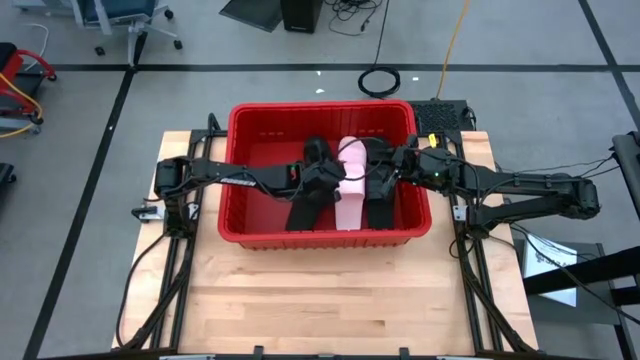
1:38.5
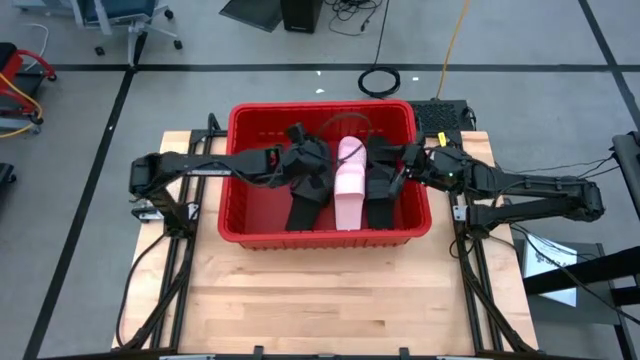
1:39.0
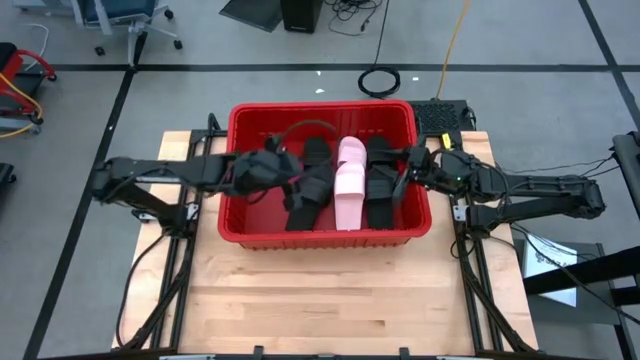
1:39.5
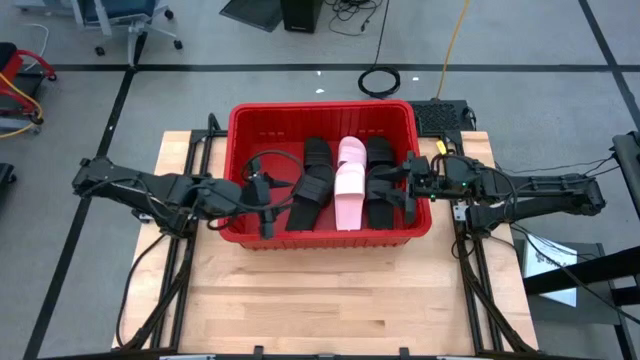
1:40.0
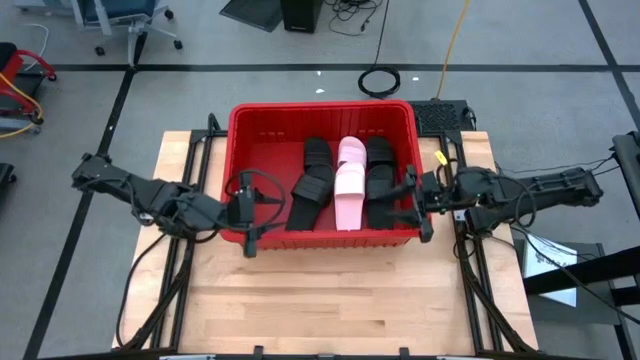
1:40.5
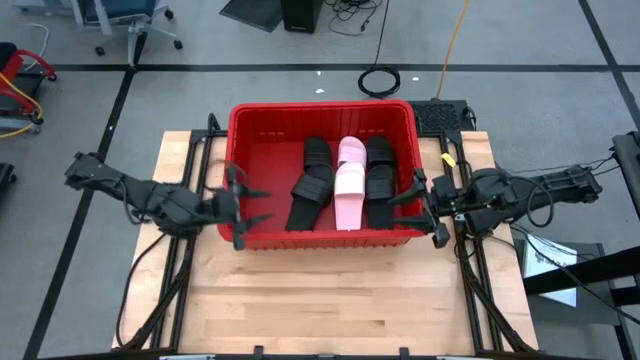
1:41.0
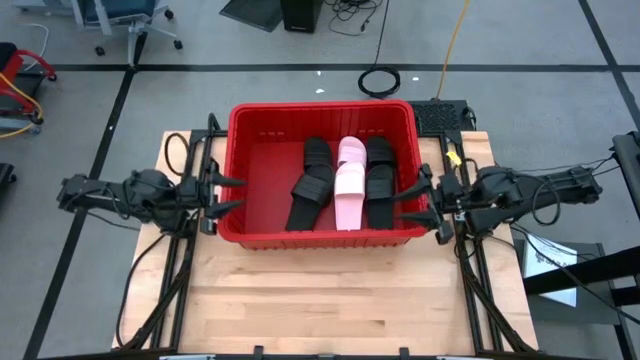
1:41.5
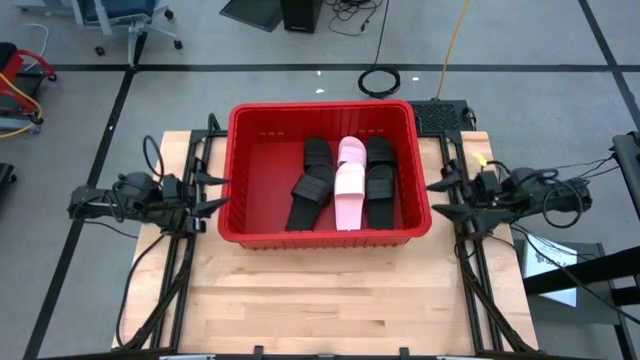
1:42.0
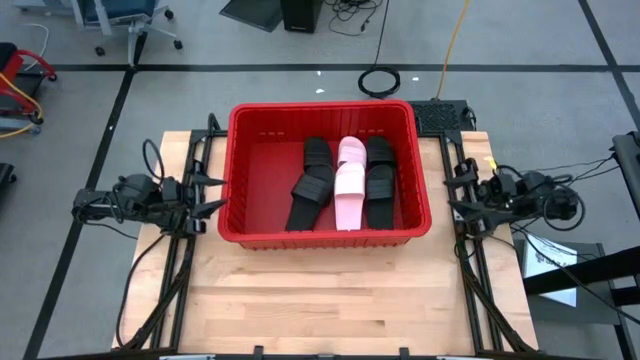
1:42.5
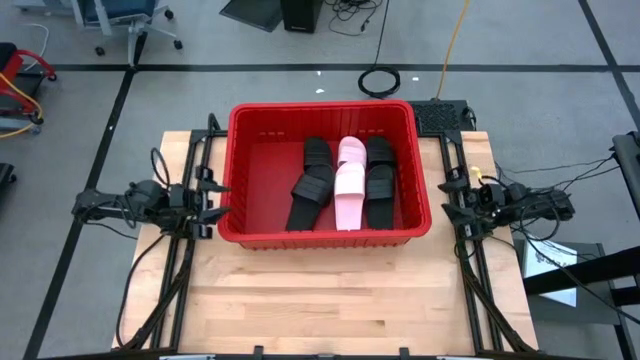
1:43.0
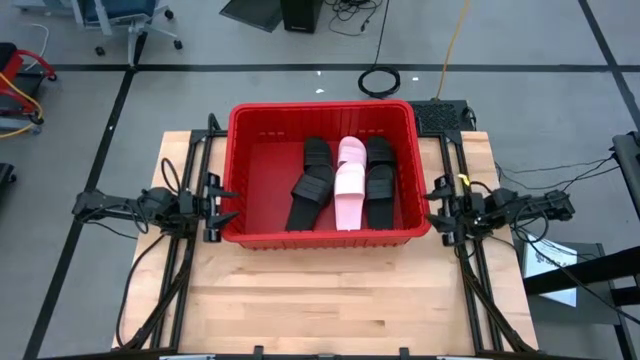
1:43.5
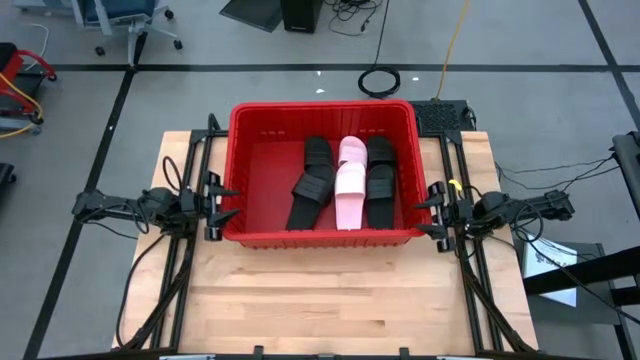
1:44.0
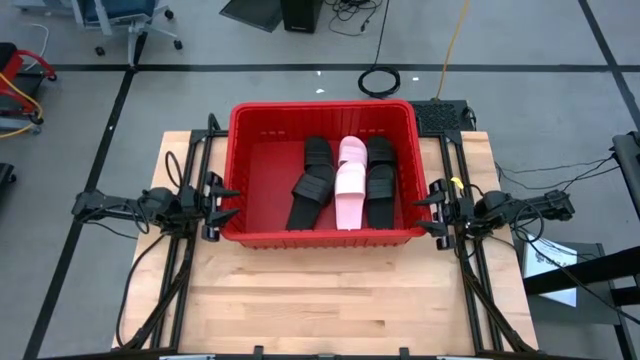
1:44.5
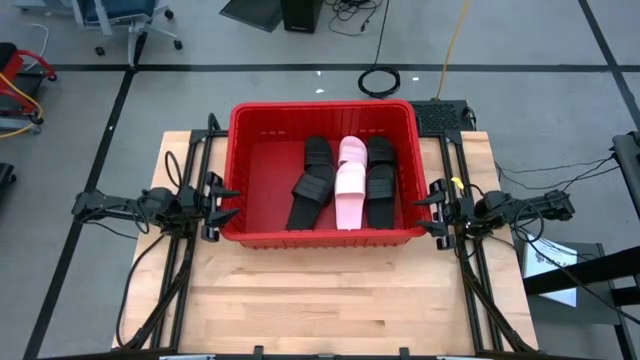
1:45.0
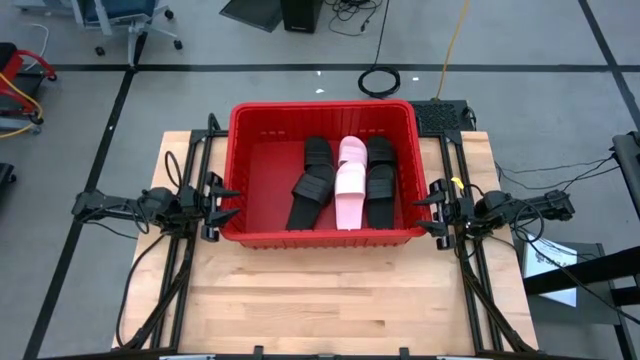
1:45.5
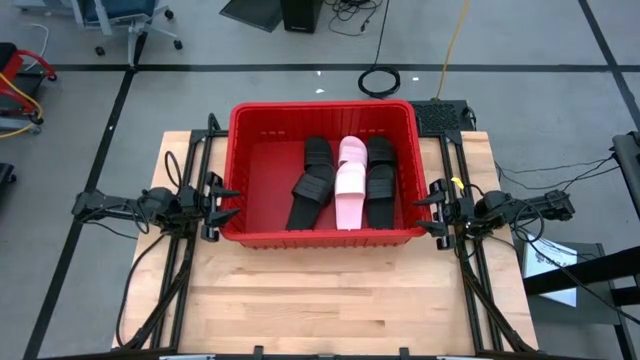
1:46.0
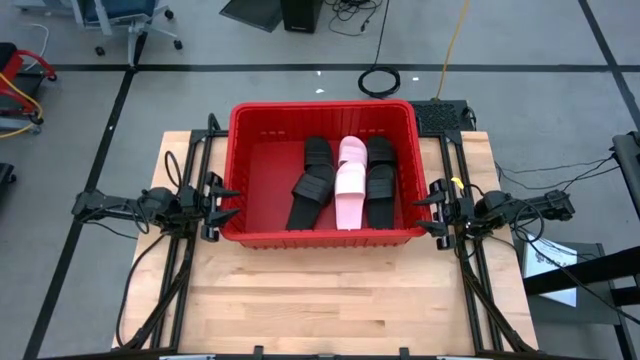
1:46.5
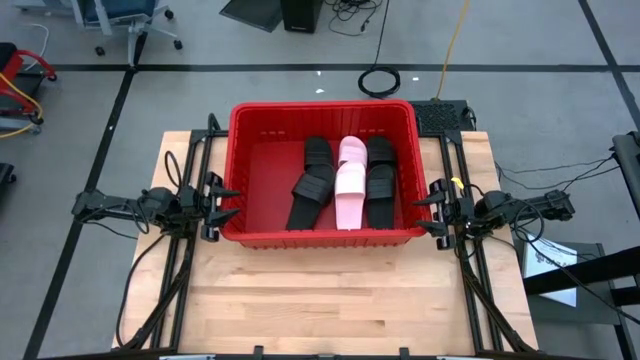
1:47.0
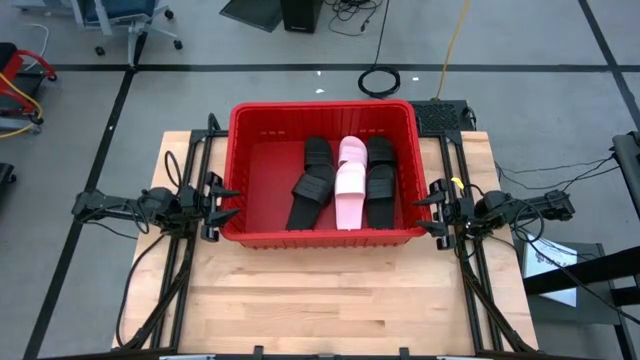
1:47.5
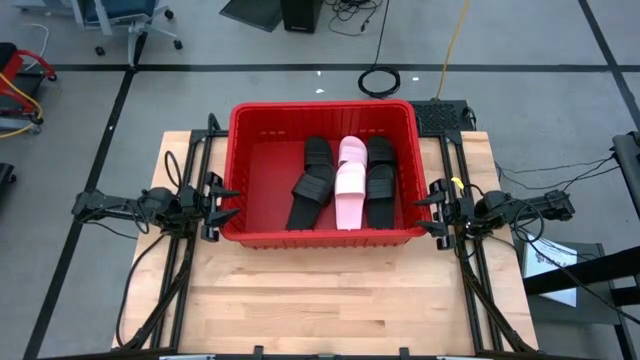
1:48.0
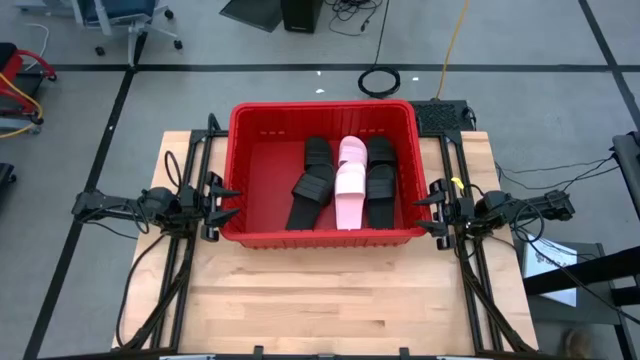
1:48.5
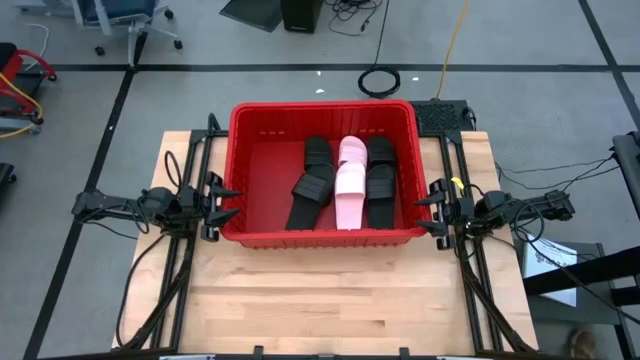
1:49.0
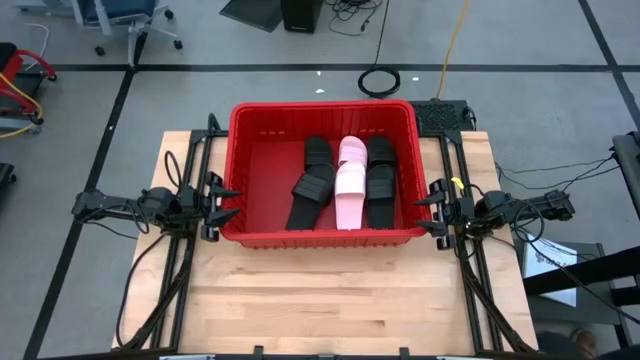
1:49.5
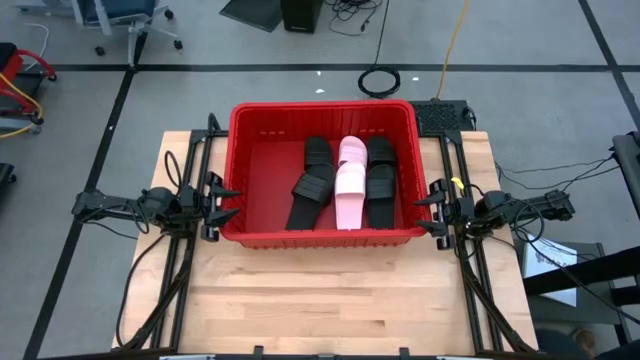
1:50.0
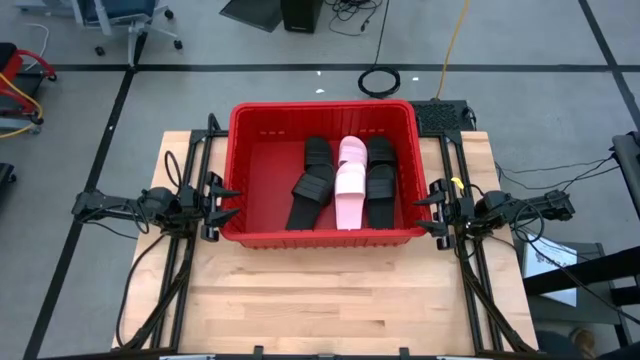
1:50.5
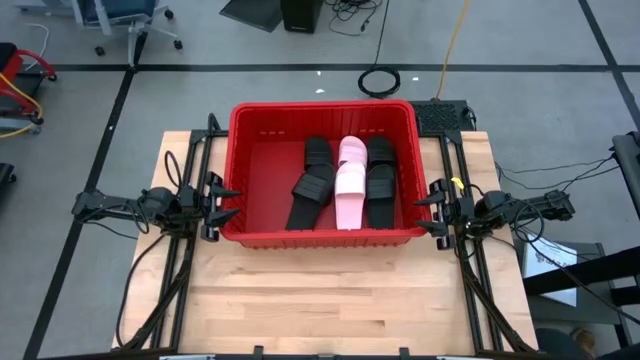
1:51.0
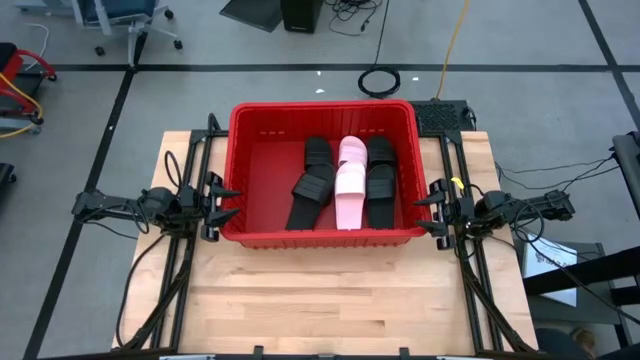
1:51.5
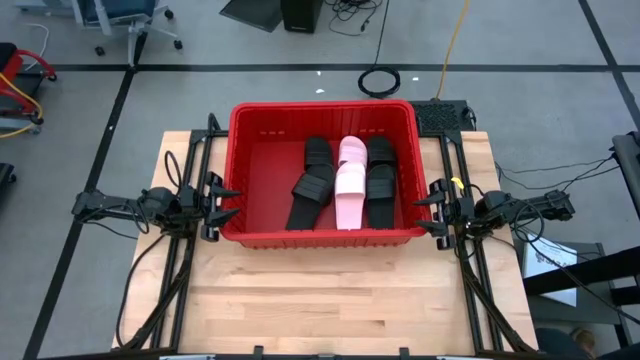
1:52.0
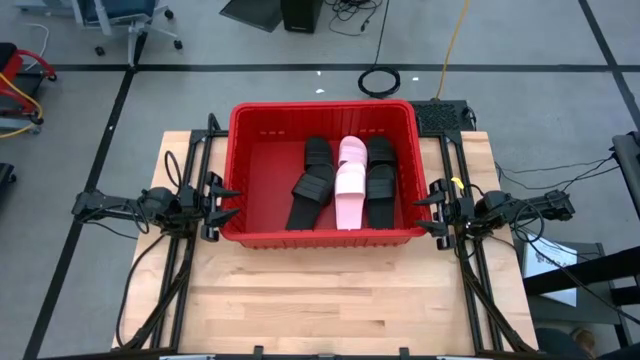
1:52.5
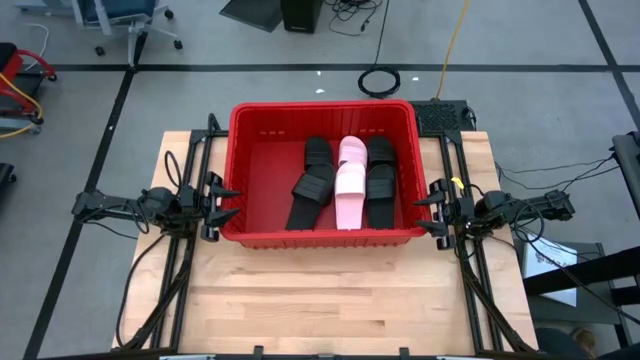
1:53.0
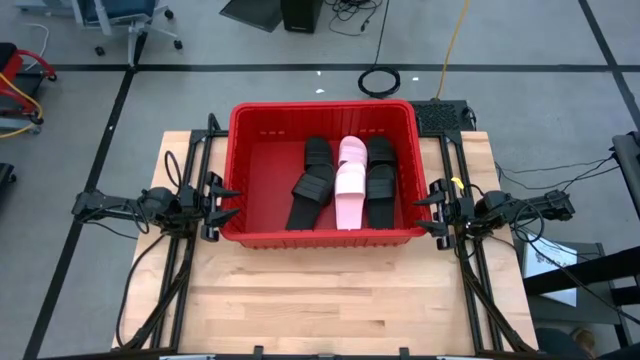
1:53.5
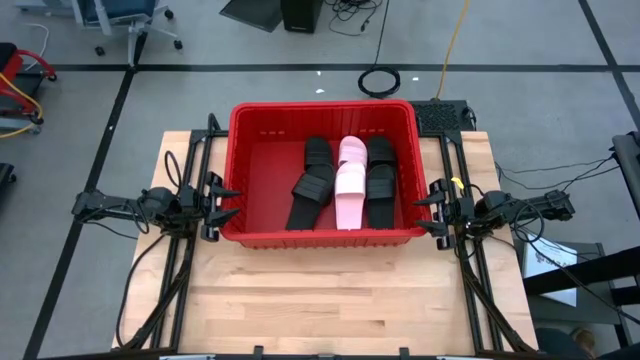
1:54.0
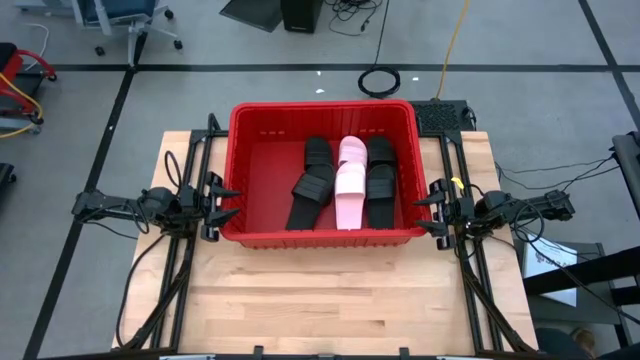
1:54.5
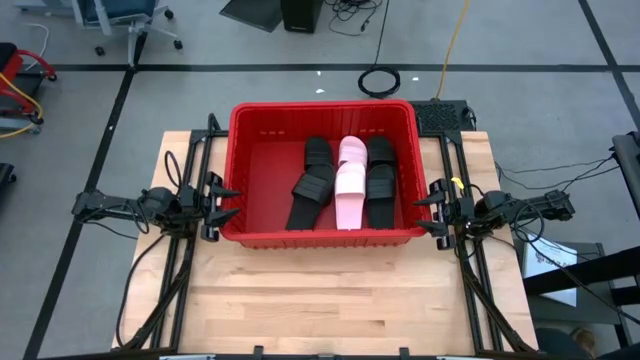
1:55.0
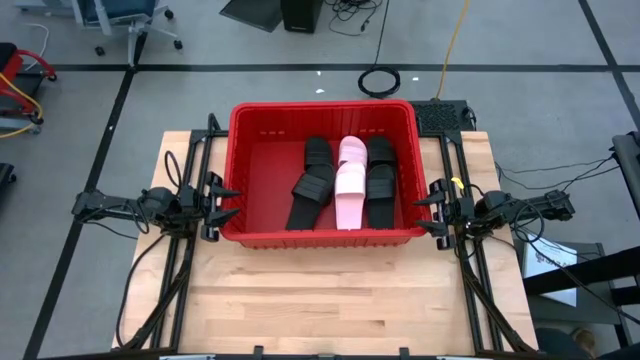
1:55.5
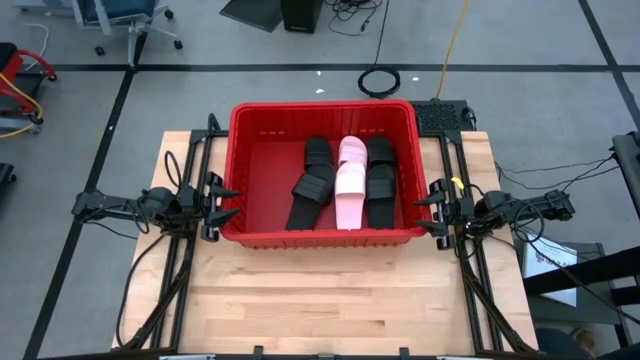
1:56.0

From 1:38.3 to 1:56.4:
Task: Pick and place slides into bin
Return to Home Position

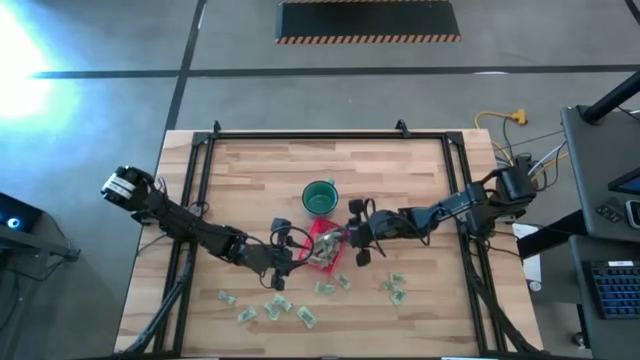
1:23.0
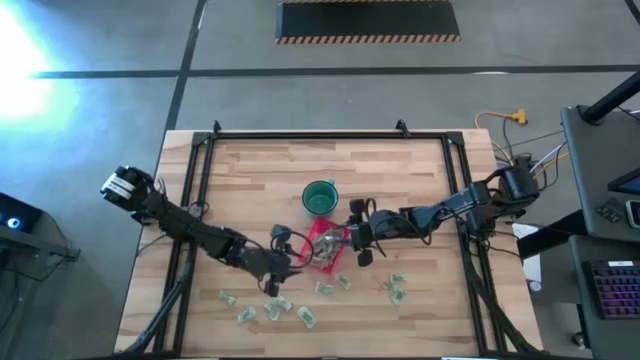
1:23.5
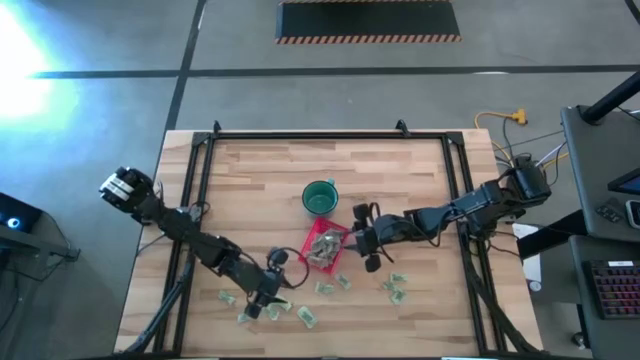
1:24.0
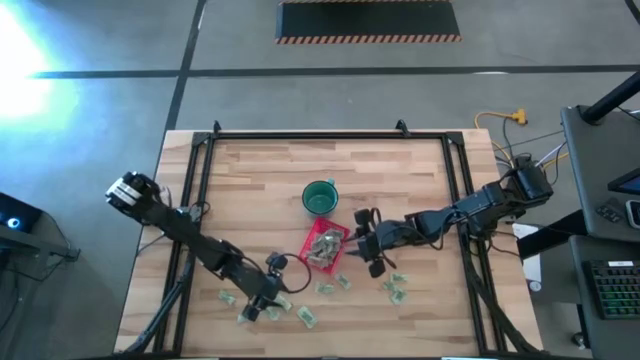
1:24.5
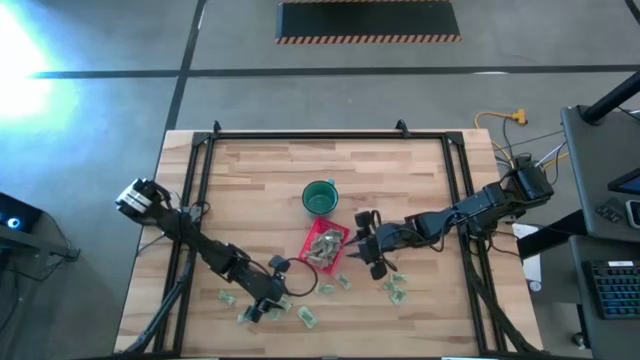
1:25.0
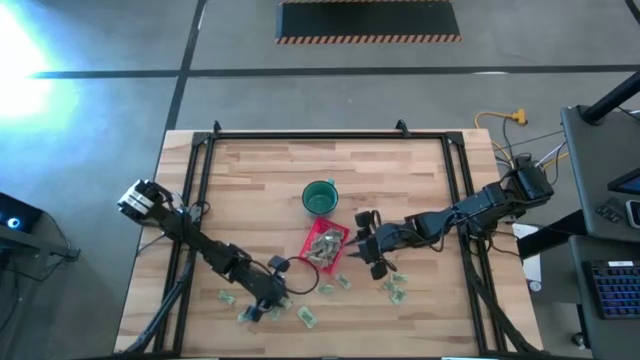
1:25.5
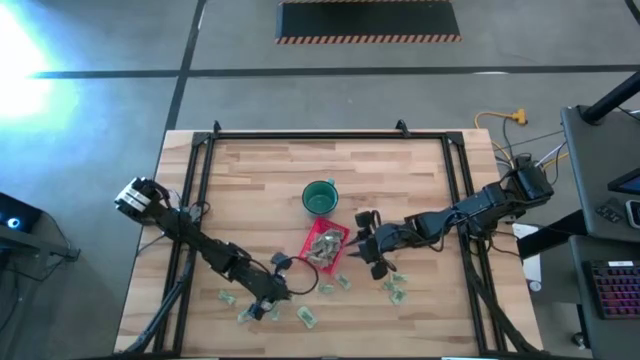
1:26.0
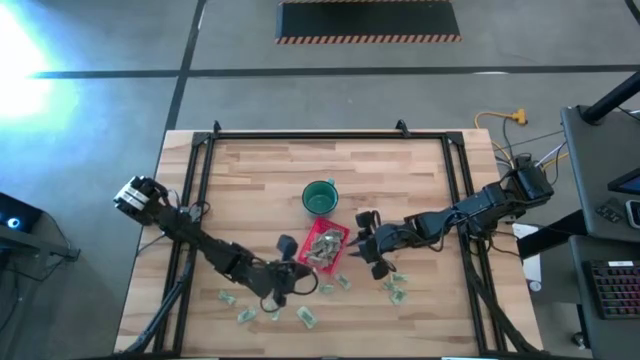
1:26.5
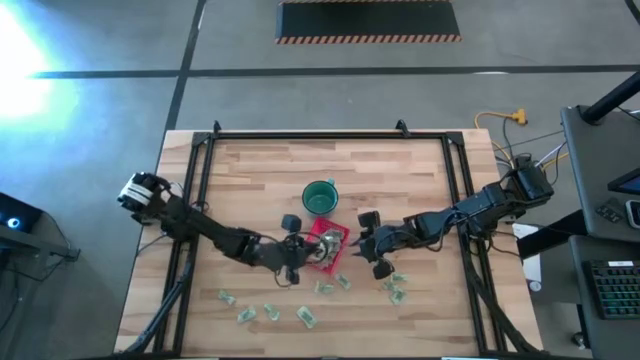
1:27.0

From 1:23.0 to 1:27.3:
Task: Pick and place items into bin
Put the light green stevia packet into the red bin
